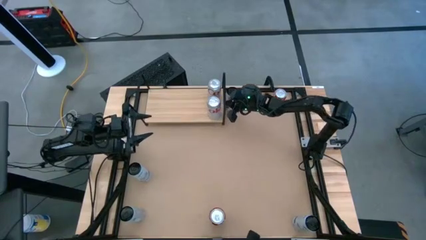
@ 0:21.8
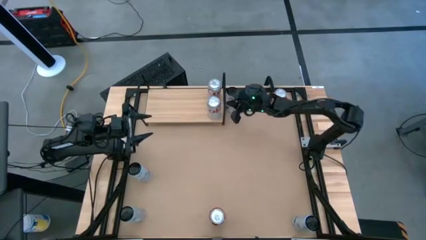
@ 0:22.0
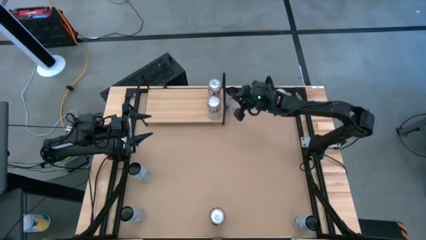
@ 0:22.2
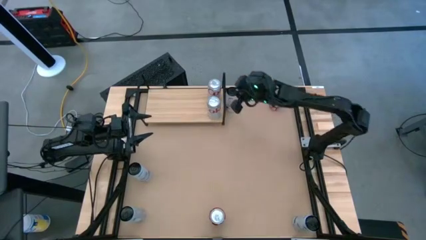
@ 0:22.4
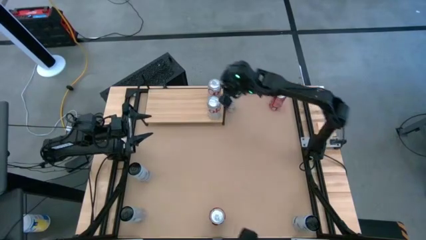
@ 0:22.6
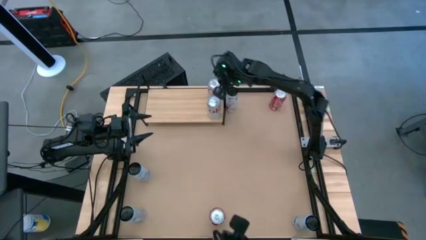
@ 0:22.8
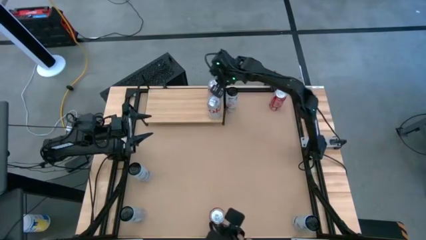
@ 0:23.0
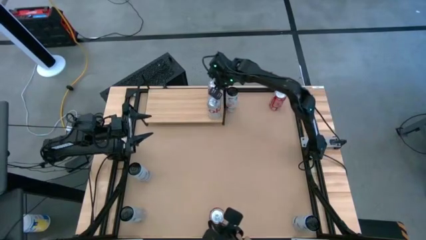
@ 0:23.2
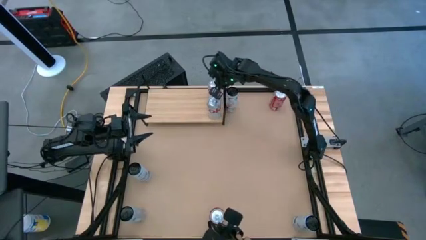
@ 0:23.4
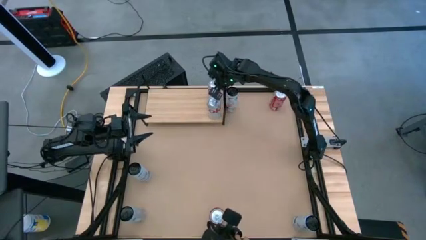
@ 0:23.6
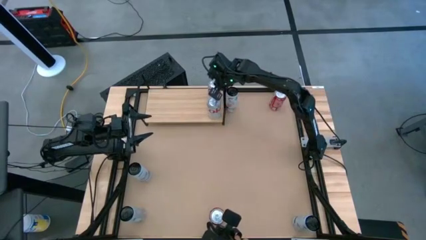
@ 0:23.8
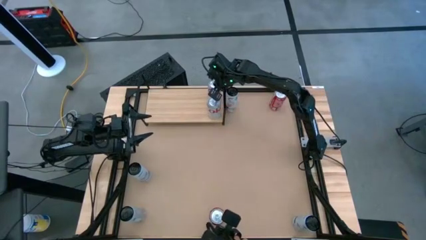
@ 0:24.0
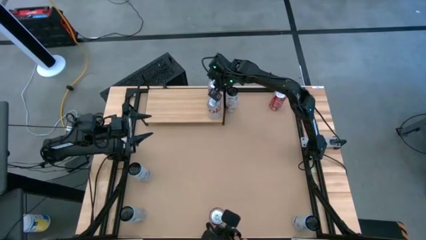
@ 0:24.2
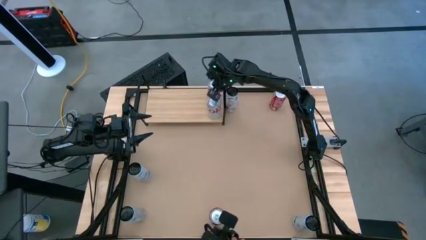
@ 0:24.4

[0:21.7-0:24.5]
Task: Place canned beverage on shelf
Adjust the silver and red soda can on the shelf

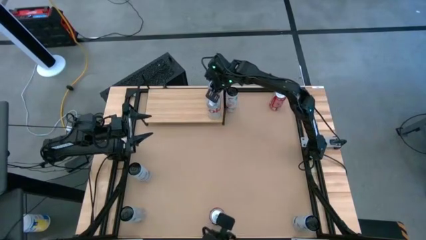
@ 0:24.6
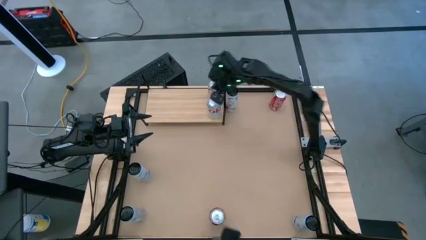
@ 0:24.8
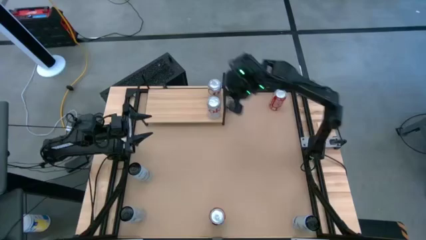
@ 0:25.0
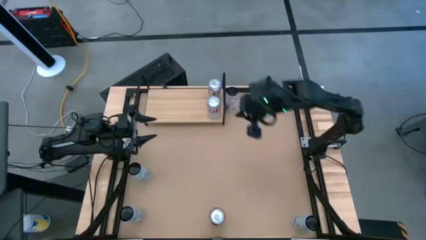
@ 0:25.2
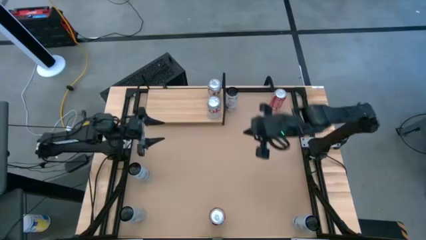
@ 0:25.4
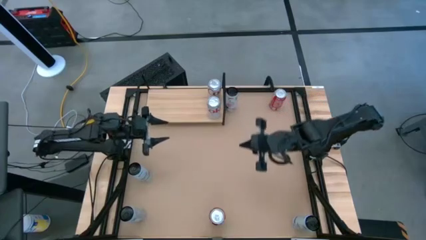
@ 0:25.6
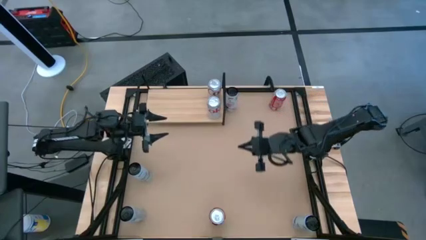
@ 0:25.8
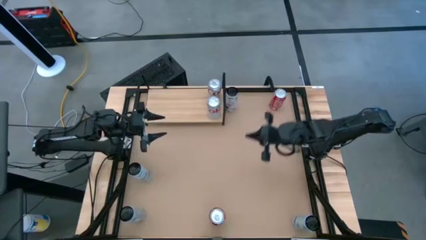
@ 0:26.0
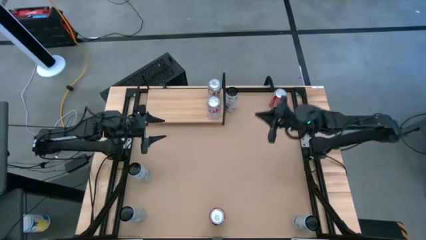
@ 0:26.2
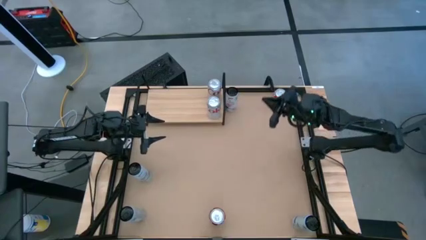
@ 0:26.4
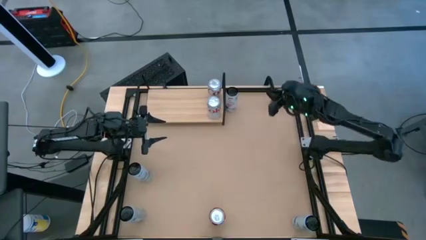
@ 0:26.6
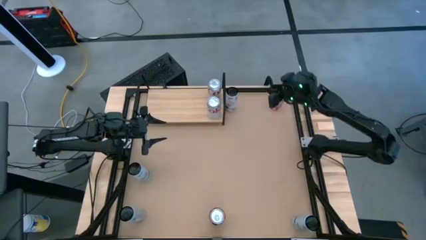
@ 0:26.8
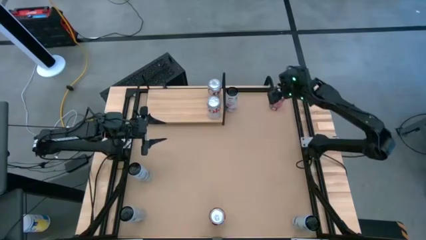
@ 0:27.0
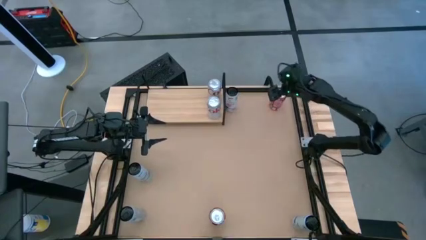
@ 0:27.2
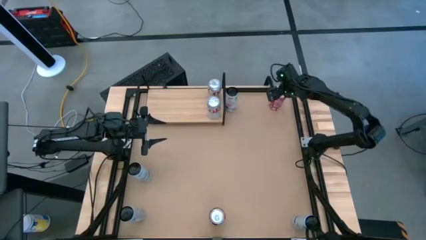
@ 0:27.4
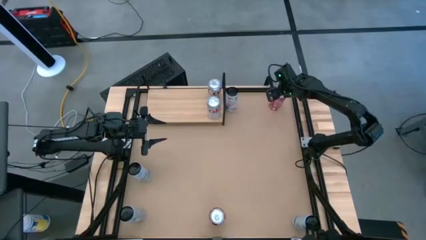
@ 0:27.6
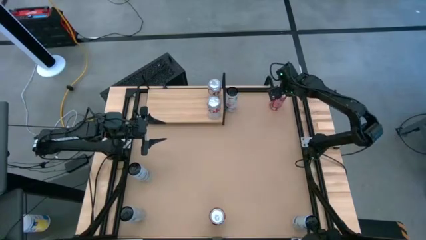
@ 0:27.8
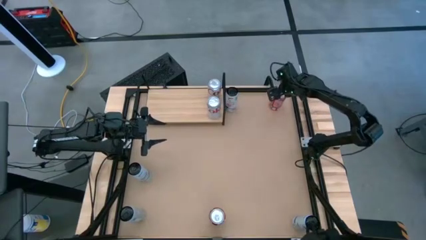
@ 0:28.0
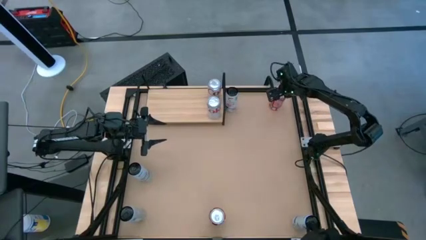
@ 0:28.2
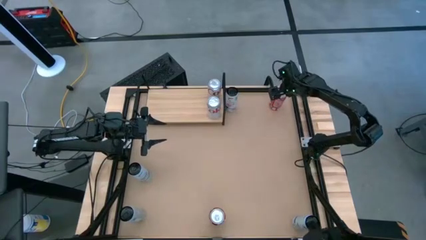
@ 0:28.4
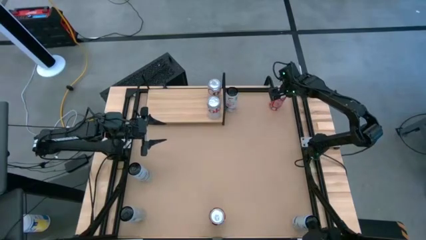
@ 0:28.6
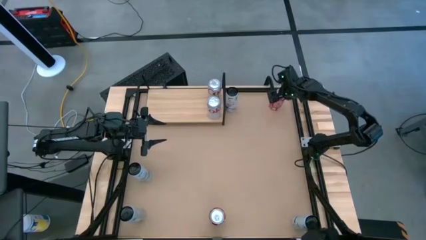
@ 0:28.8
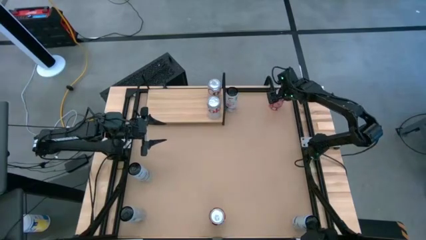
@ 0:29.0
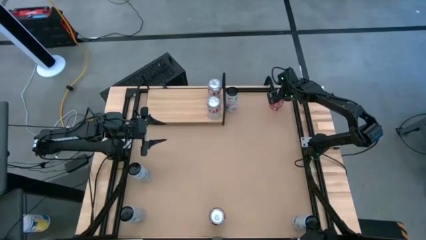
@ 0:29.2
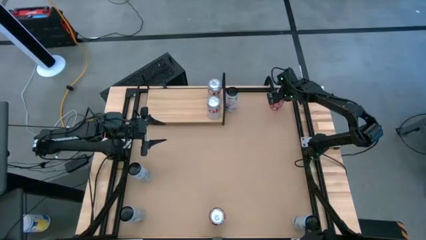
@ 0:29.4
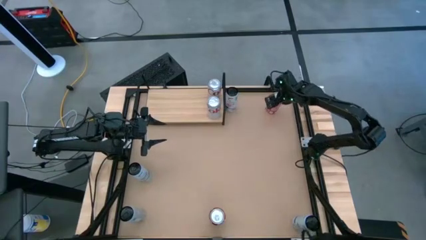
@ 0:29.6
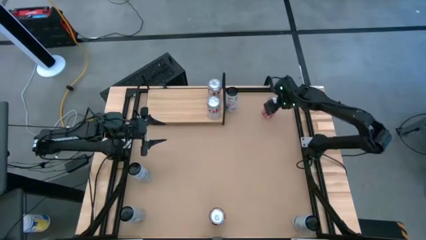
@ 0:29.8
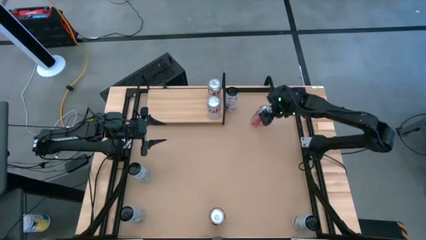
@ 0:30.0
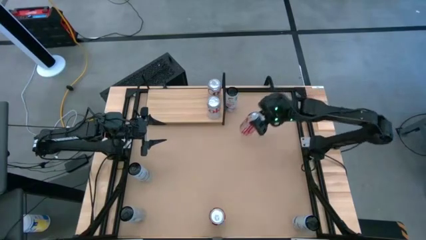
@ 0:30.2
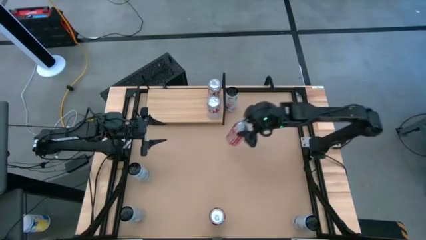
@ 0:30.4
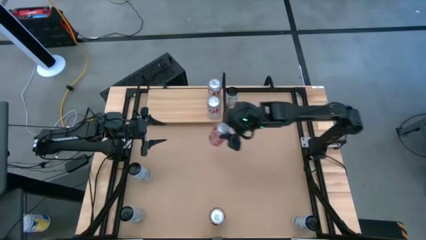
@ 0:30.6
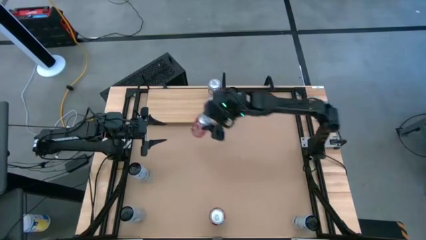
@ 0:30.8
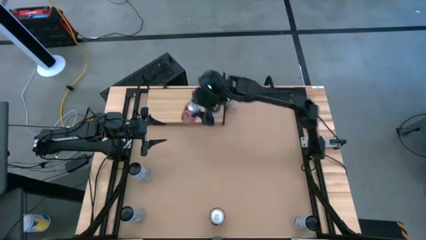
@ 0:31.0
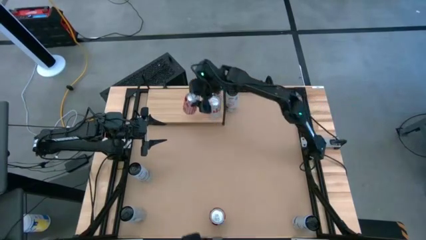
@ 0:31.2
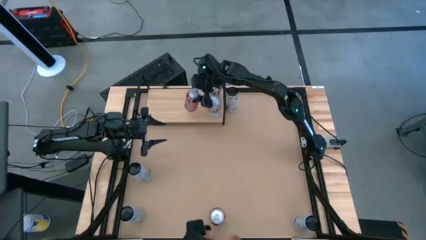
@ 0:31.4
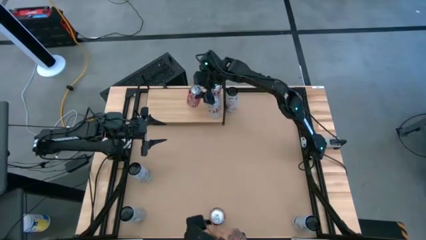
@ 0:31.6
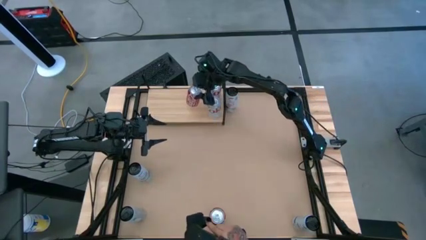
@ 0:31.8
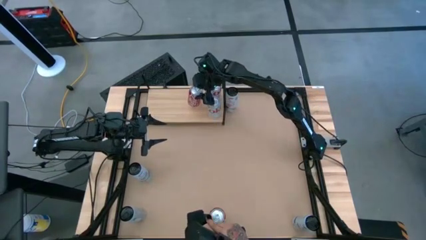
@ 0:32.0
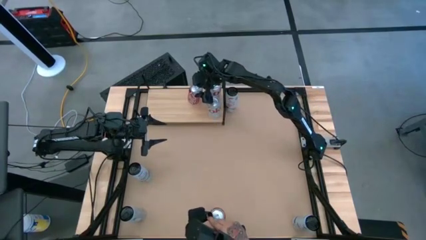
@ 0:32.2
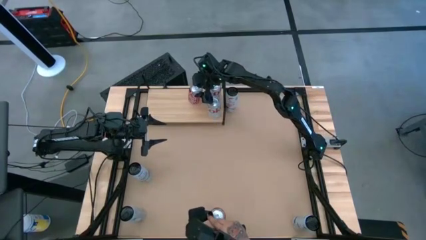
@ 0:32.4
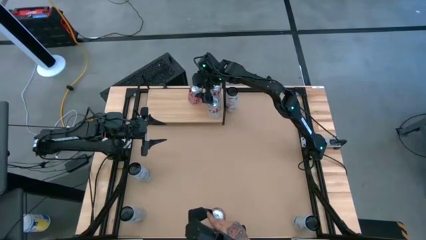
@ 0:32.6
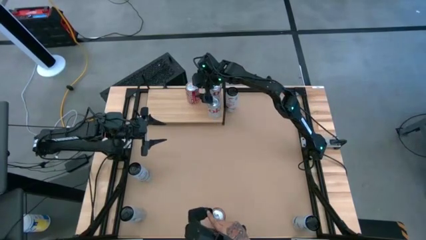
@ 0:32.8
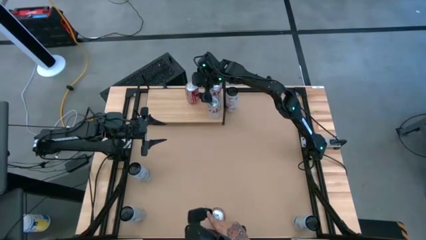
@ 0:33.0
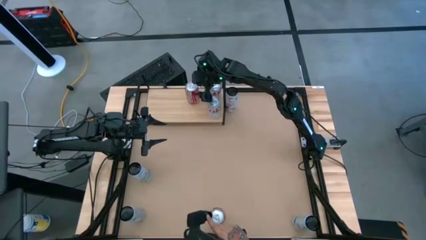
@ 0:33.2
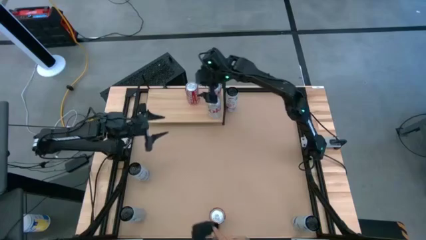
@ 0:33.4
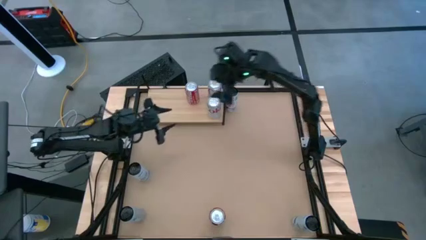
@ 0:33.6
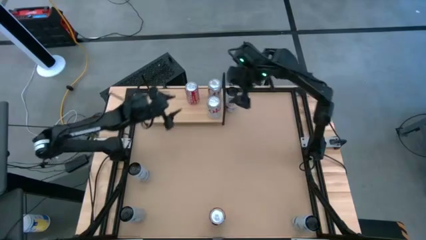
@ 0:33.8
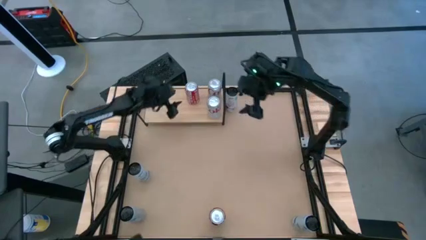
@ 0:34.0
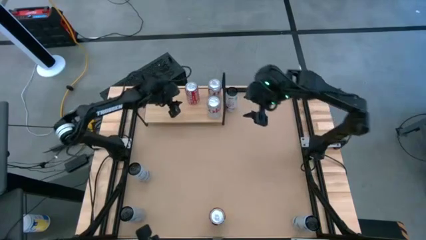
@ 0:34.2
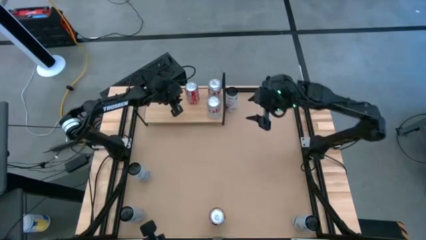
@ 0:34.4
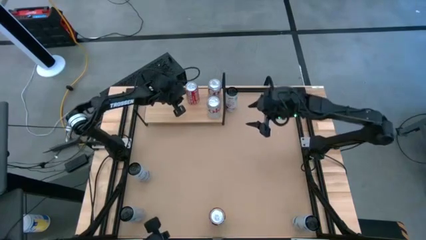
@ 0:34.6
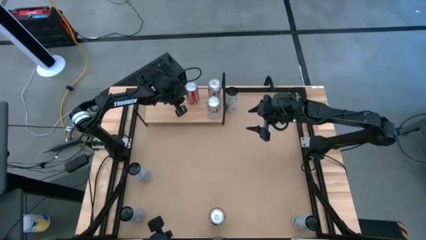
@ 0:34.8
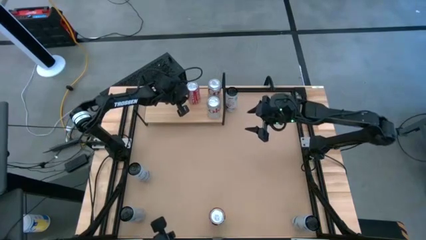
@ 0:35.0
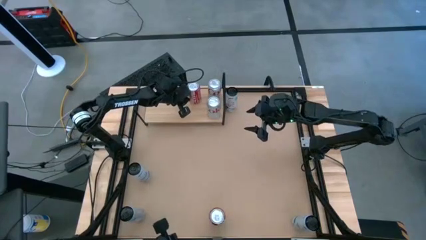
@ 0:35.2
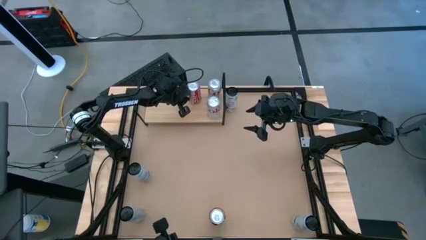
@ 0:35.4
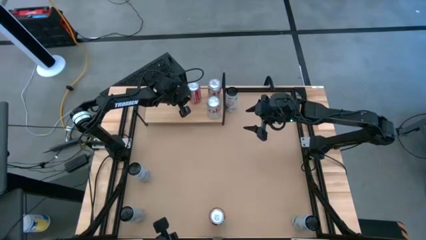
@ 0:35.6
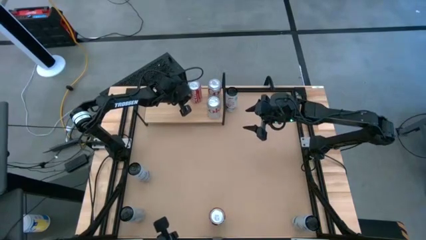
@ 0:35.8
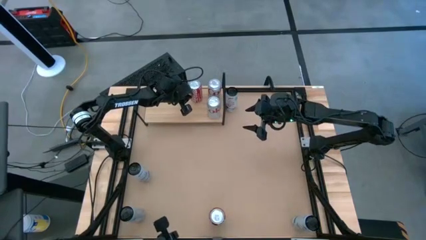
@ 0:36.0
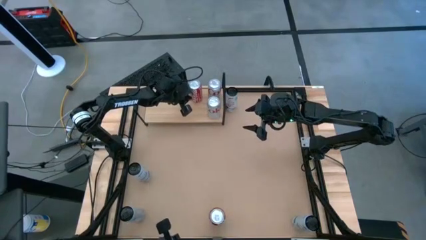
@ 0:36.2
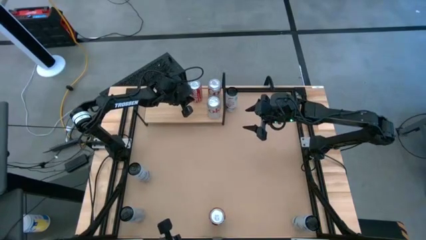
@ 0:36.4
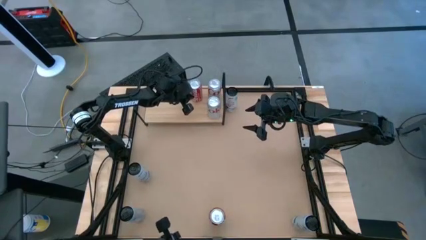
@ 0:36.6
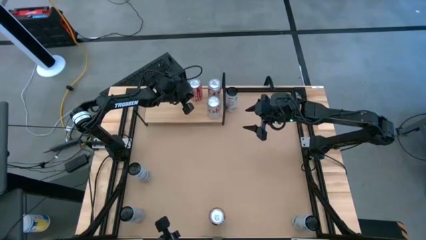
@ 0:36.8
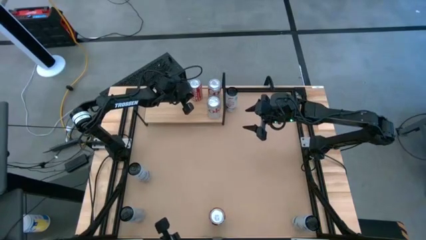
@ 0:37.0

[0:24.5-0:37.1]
Put the top red and white soda can on the shelf
